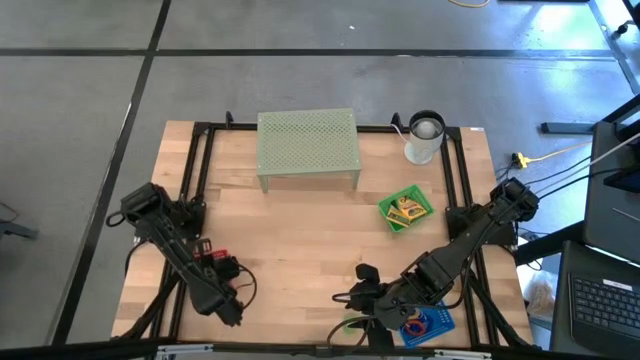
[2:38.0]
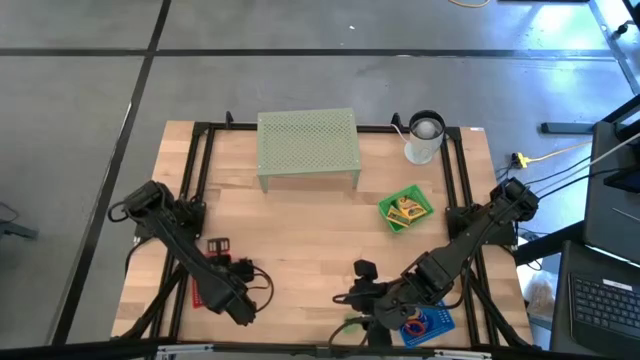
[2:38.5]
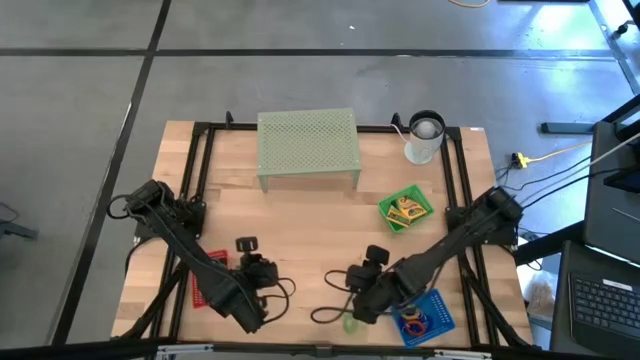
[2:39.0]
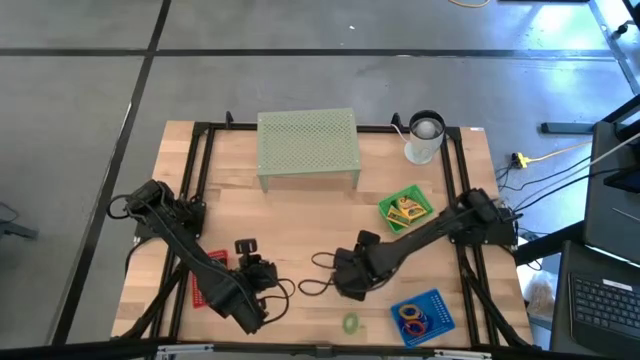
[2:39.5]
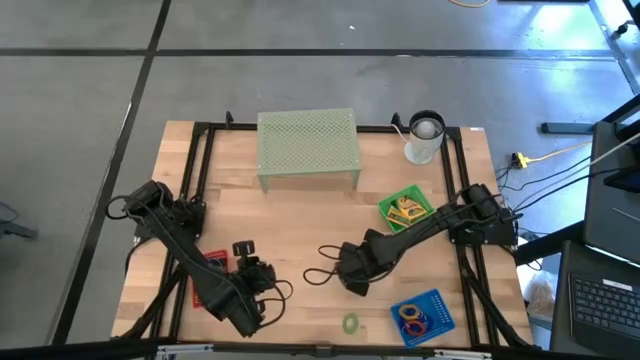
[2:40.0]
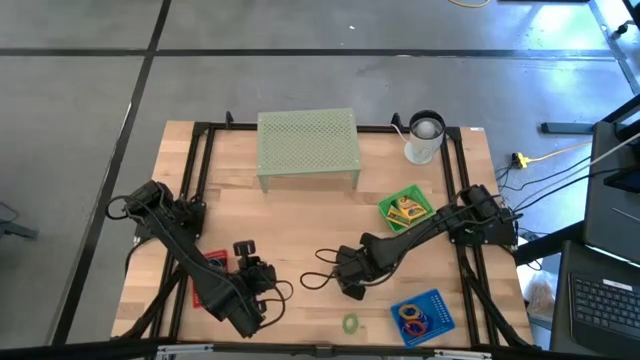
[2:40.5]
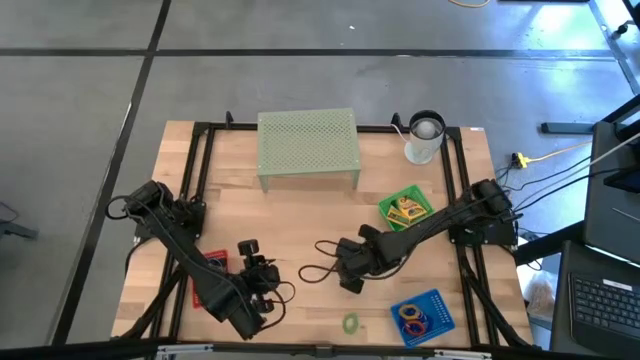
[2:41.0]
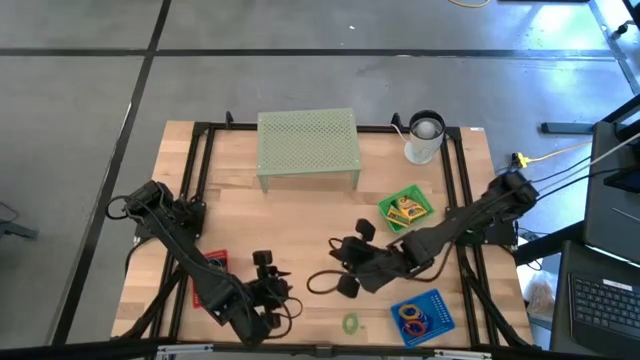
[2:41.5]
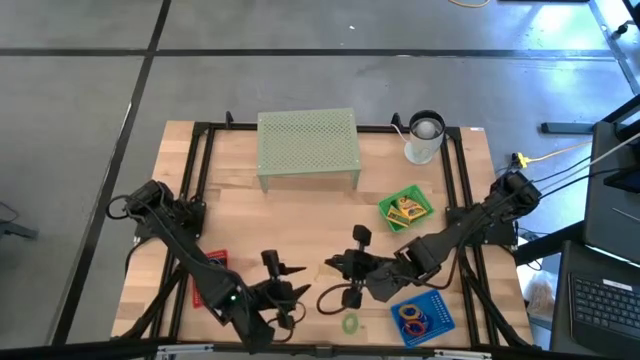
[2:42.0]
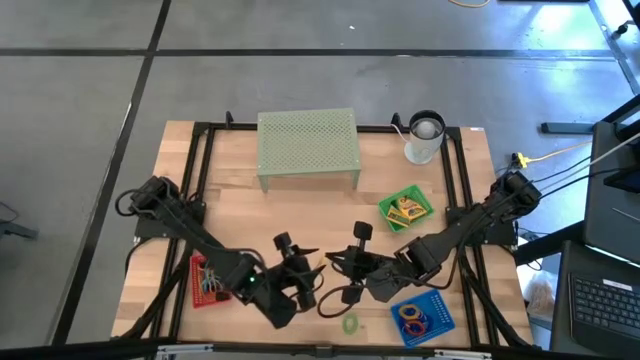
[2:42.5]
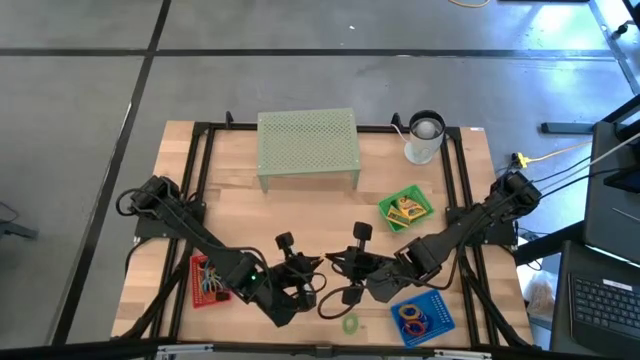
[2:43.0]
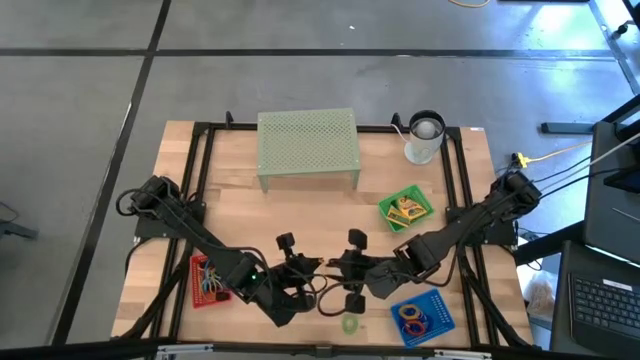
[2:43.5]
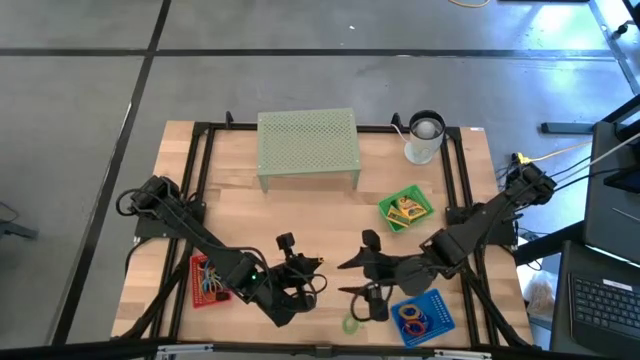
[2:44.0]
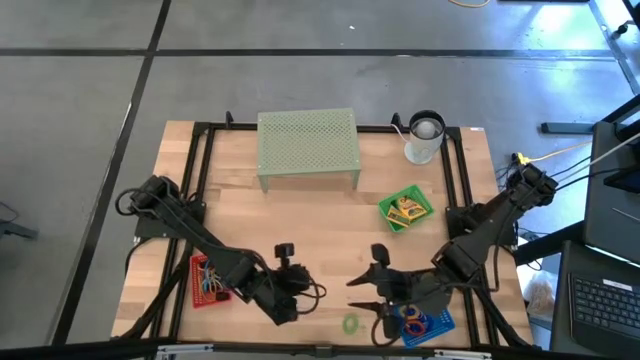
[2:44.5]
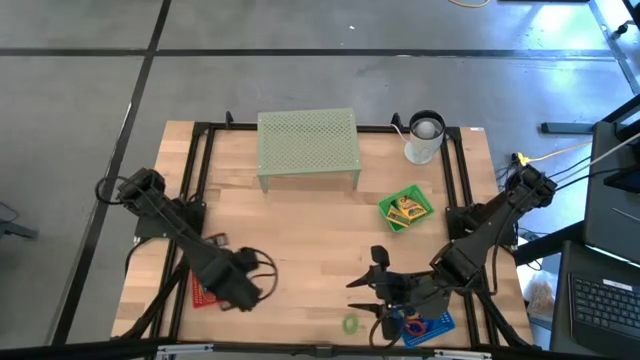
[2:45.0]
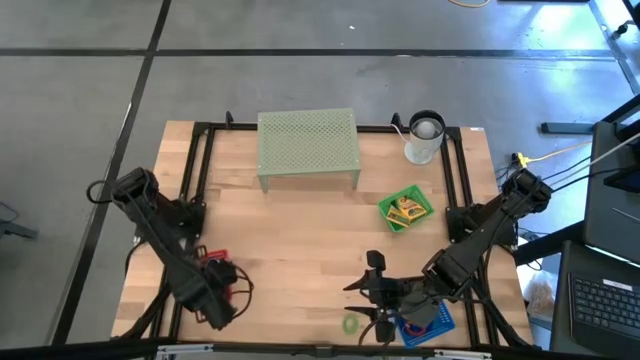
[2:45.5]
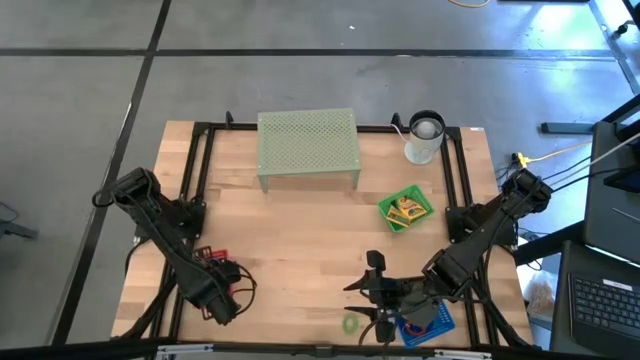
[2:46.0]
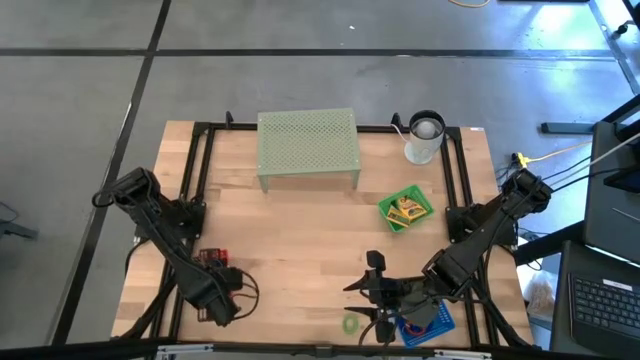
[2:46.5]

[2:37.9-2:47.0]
Task: Pick & Place Office Desk Supplies
Put the yellow rubber band into the red bin

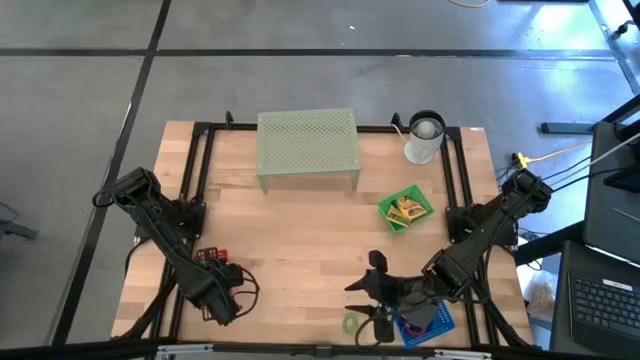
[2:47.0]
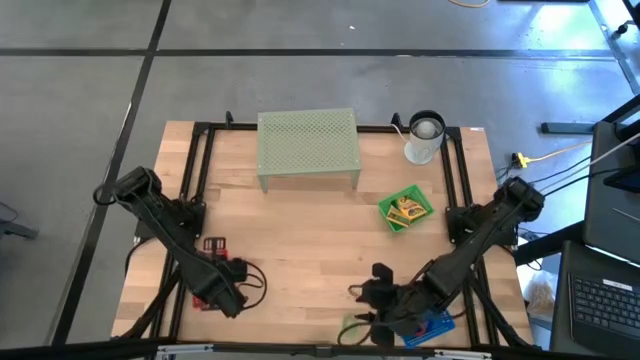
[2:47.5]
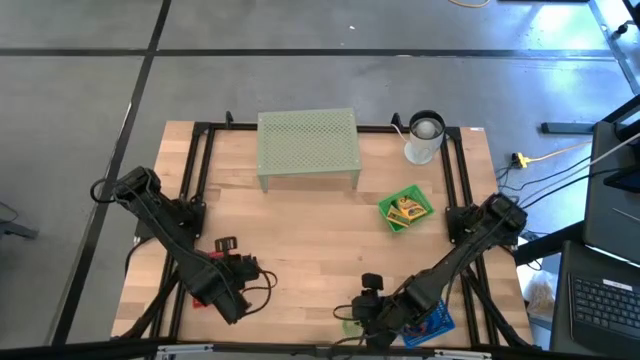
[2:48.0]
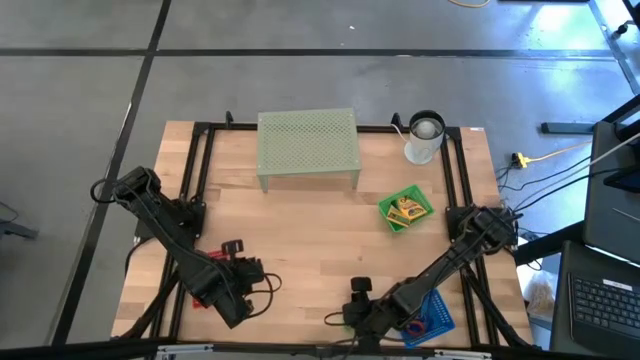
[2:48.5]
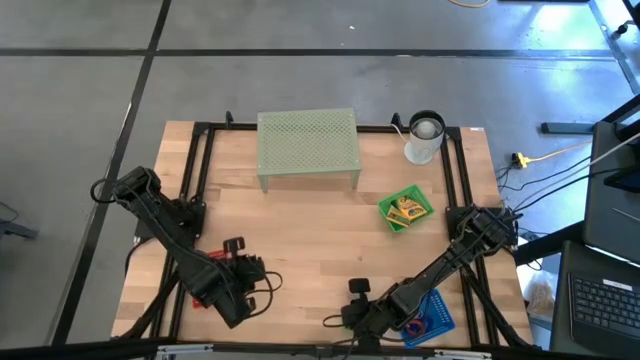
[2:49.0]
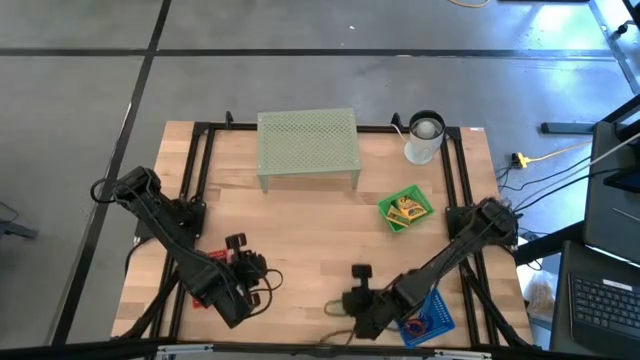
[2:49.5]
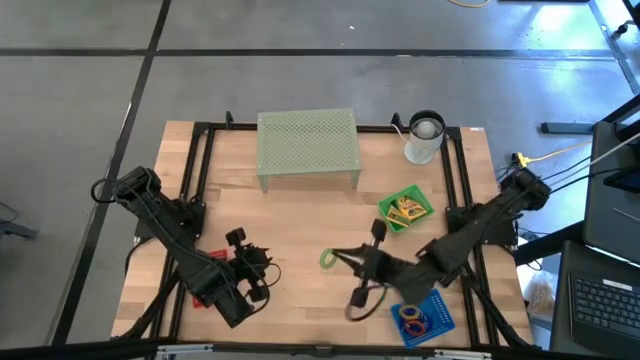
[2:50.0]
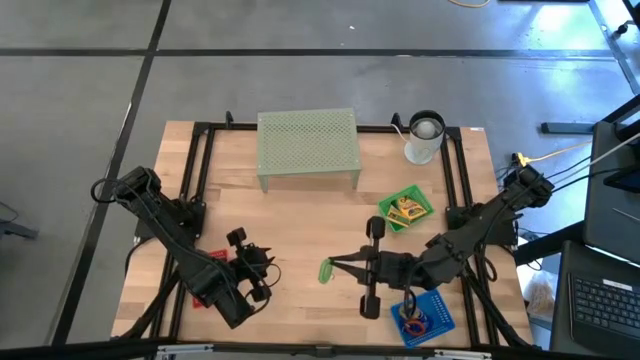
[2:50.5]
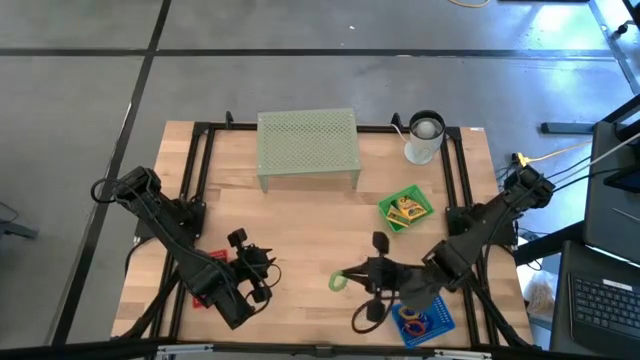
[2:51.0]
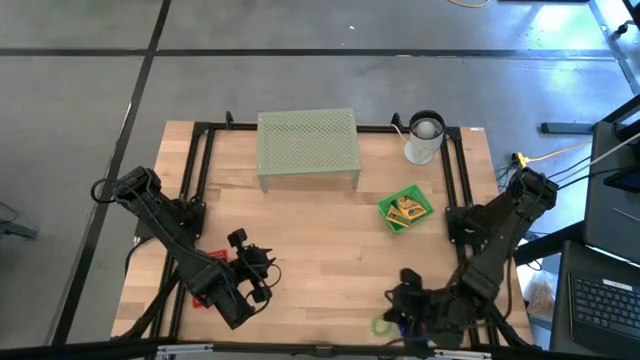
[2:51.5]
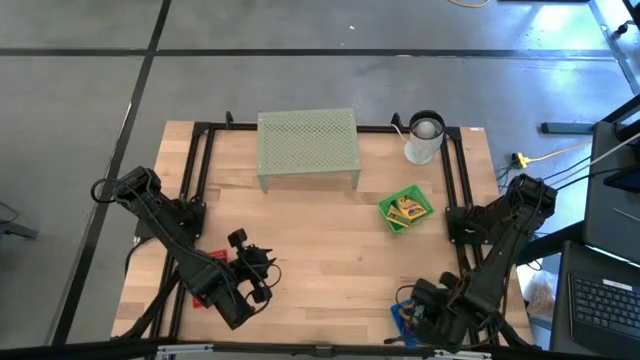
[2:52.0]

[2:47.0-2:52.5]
Put the green spring rubber band into the blue bin

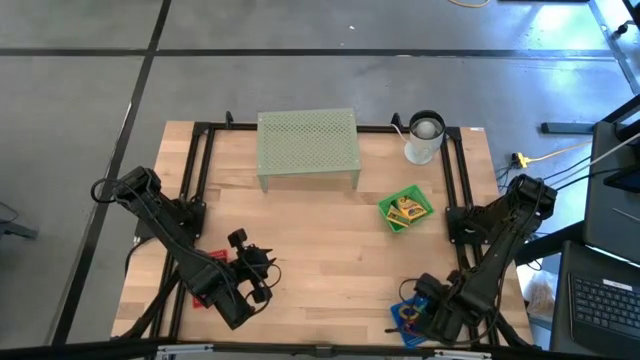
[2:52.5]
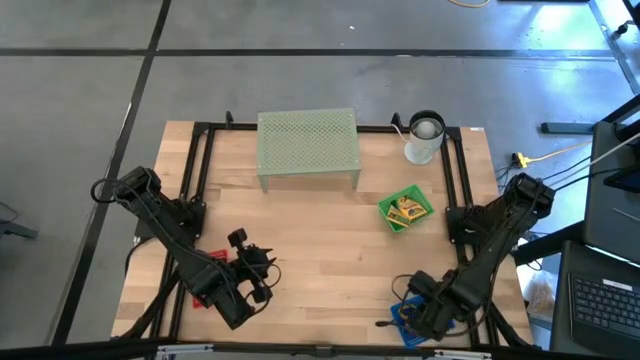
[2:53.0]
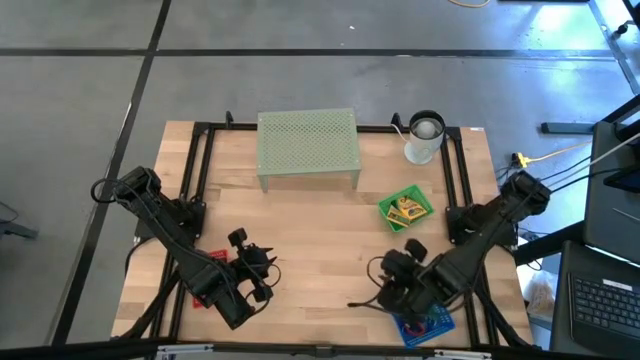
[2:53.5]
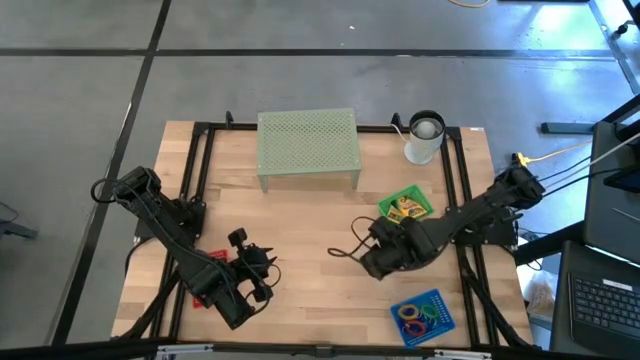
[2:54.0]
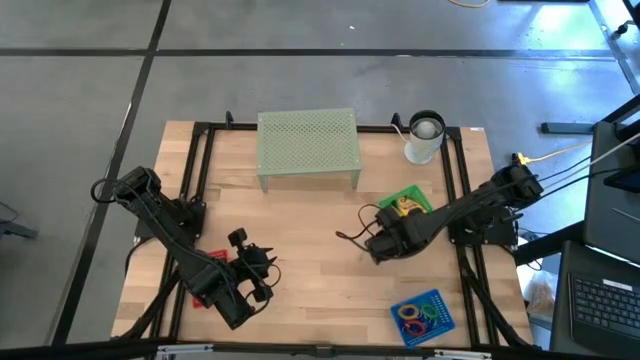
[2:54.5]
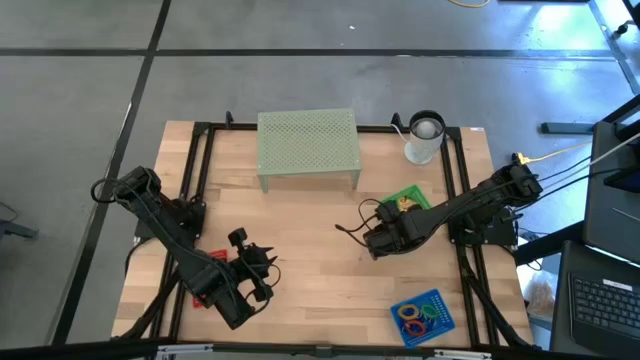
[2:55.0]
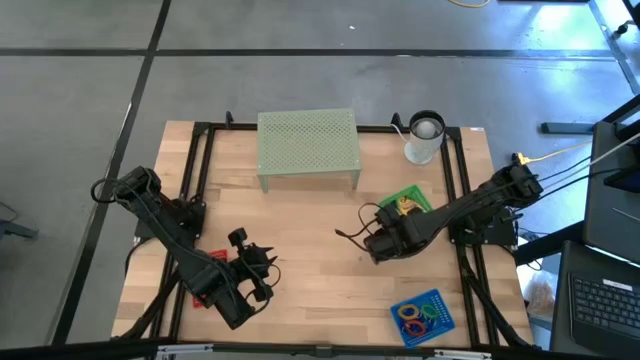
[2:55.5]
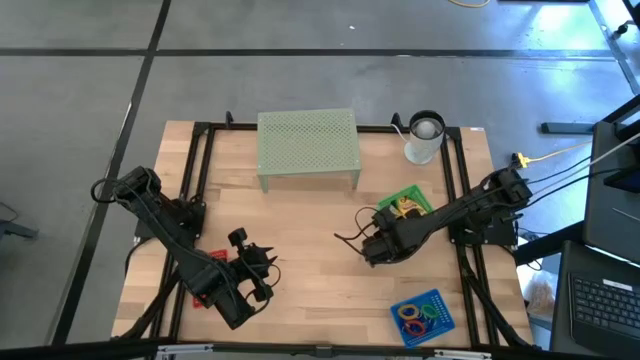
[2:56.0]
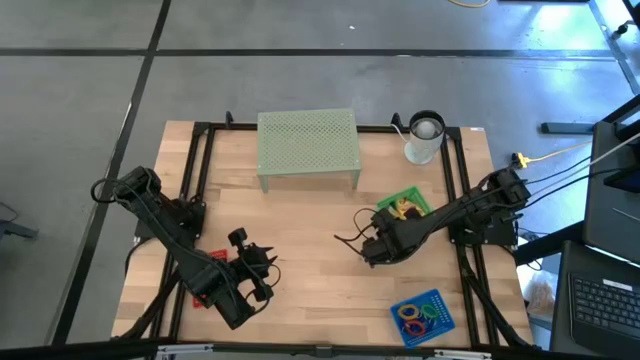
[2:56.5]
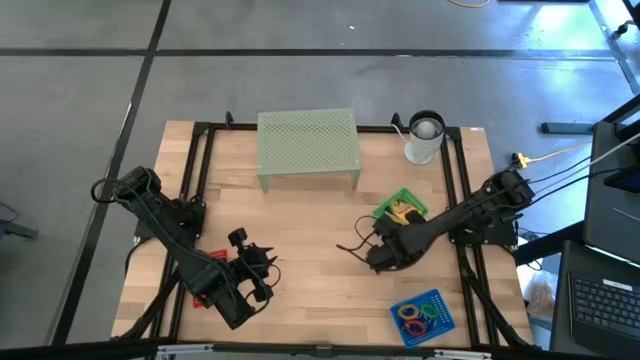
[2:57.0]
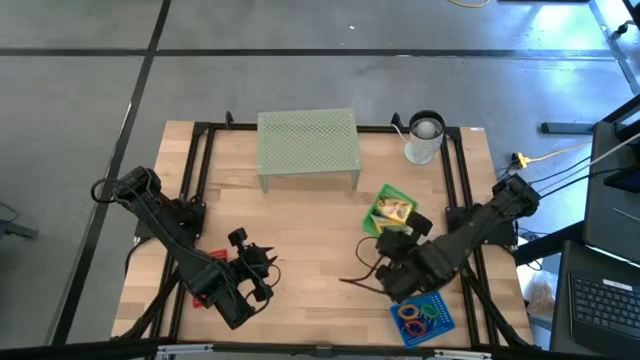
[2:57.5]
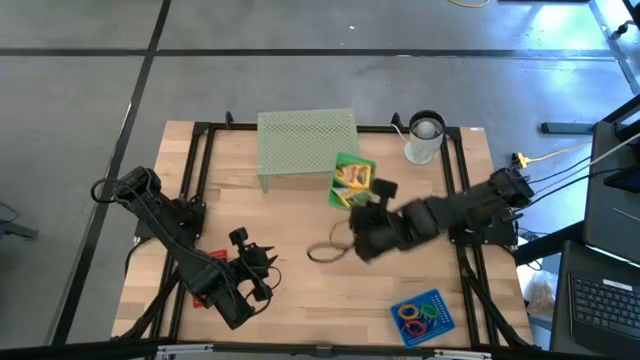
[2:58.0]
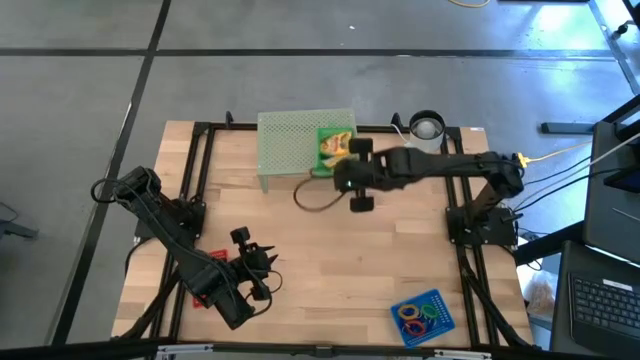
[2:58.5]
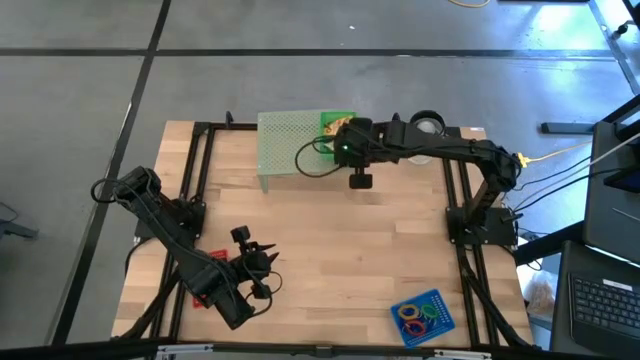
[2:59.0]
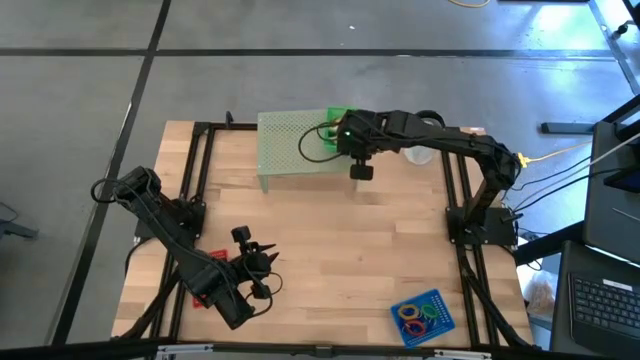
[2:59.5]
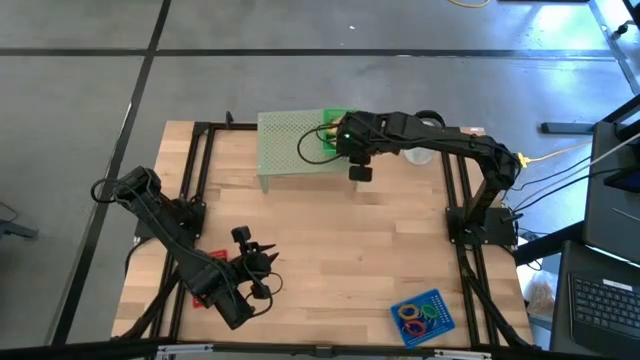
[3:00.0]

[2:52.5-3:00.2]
Put the green bin on the shelf
